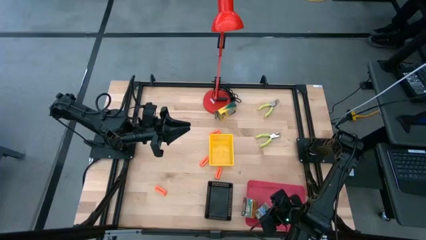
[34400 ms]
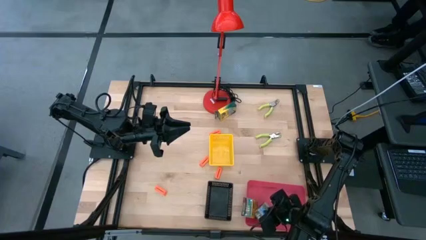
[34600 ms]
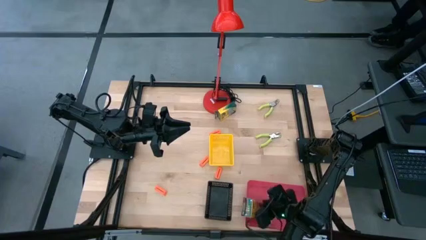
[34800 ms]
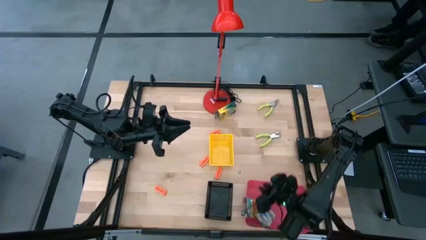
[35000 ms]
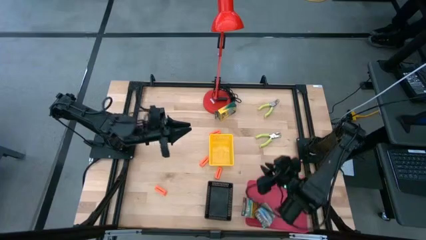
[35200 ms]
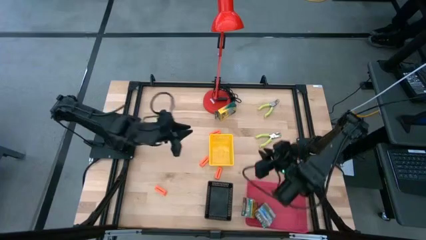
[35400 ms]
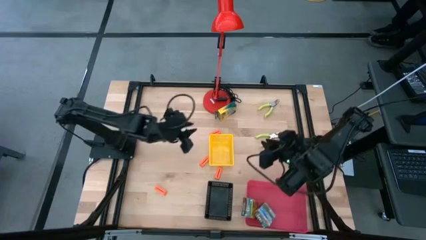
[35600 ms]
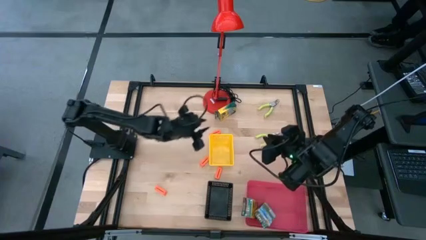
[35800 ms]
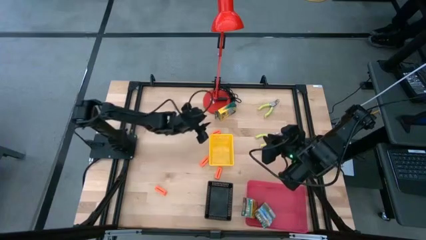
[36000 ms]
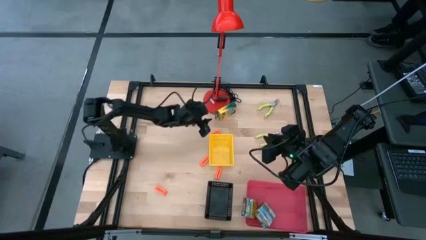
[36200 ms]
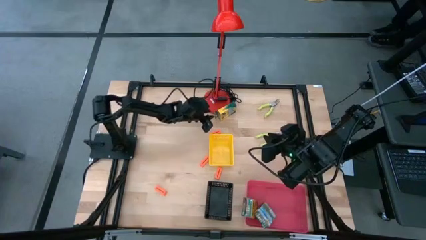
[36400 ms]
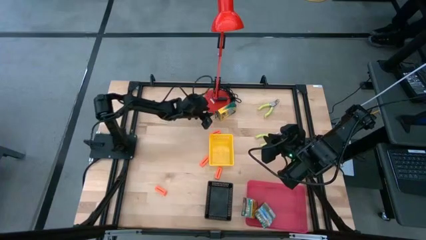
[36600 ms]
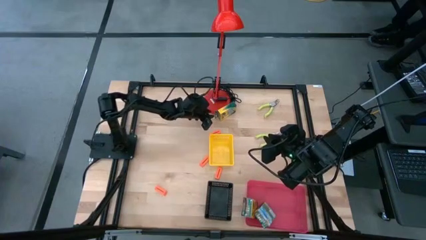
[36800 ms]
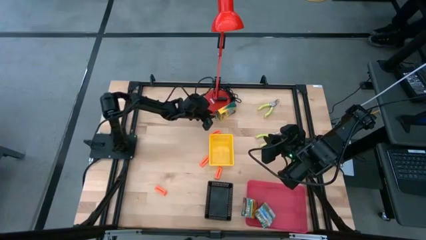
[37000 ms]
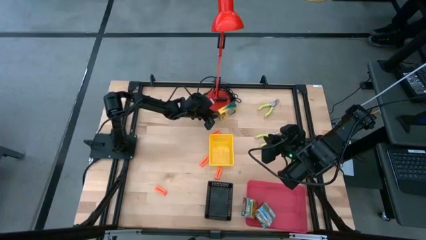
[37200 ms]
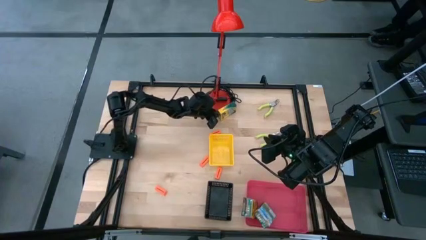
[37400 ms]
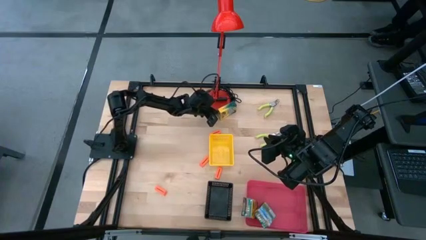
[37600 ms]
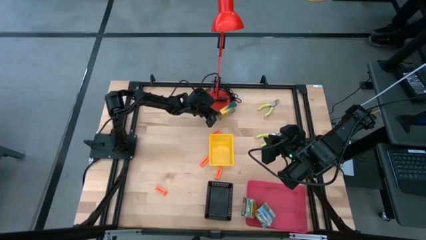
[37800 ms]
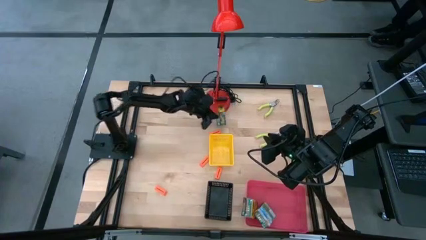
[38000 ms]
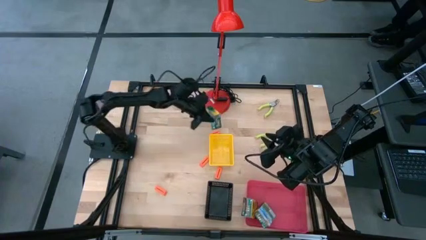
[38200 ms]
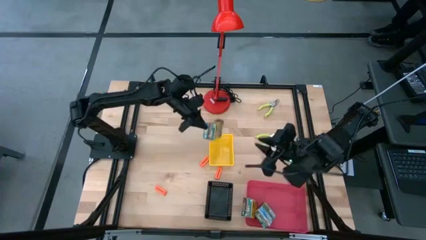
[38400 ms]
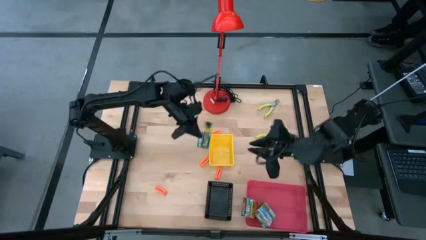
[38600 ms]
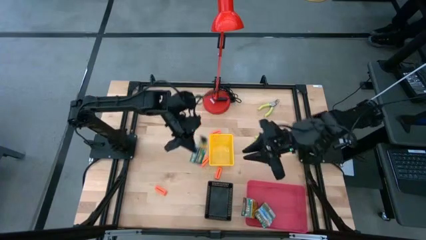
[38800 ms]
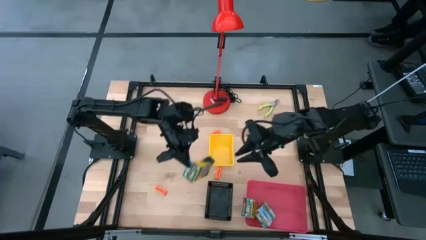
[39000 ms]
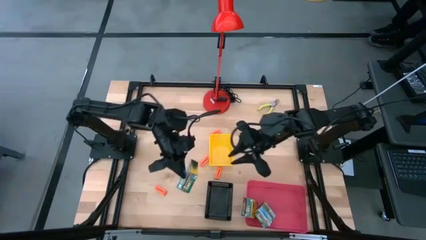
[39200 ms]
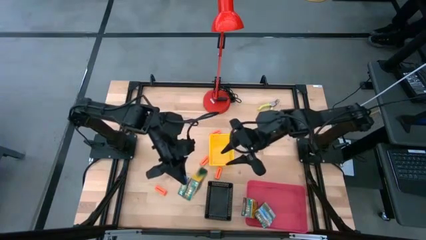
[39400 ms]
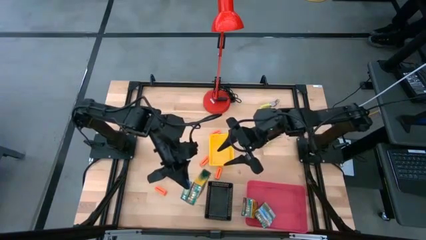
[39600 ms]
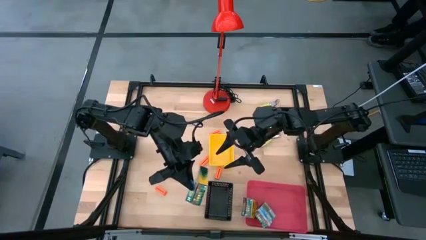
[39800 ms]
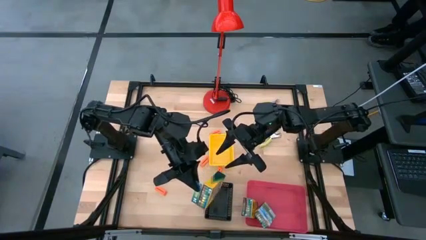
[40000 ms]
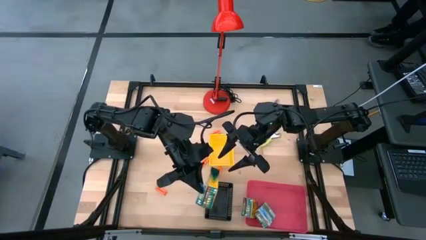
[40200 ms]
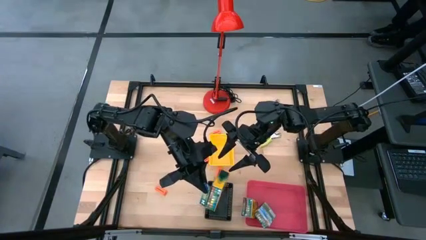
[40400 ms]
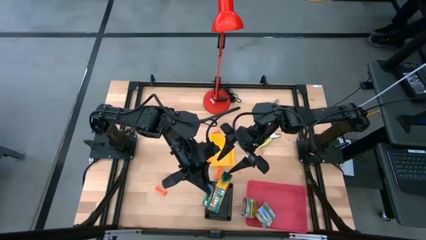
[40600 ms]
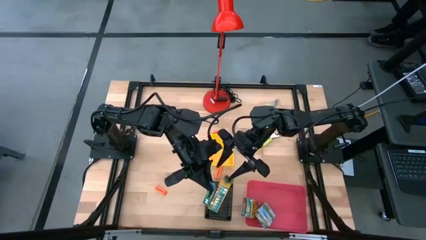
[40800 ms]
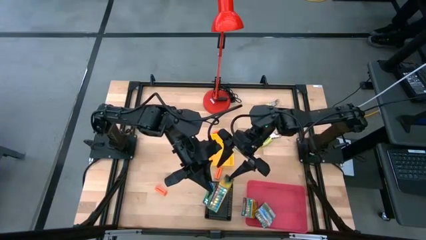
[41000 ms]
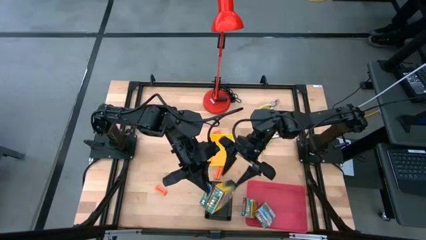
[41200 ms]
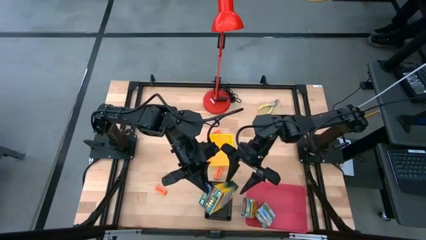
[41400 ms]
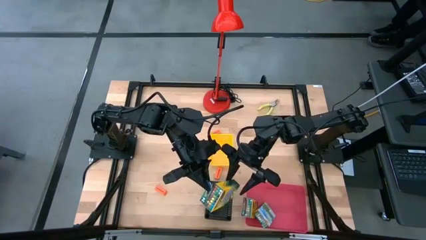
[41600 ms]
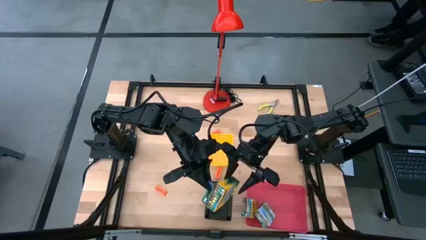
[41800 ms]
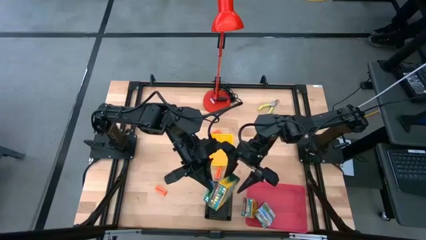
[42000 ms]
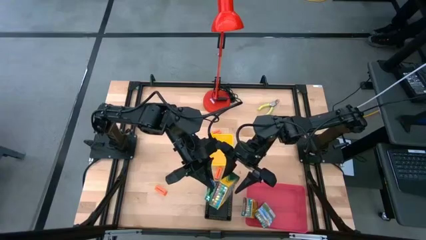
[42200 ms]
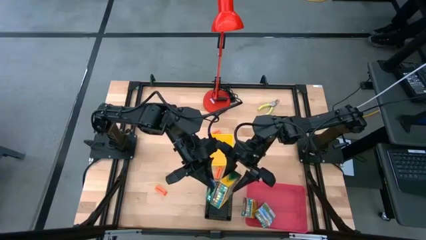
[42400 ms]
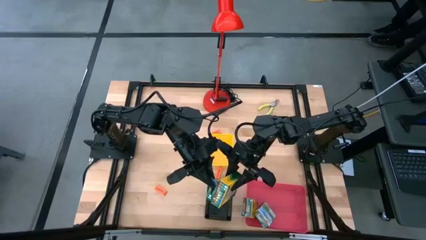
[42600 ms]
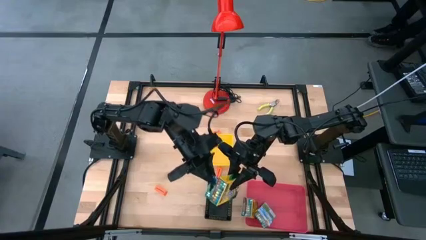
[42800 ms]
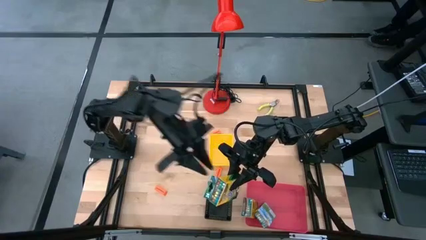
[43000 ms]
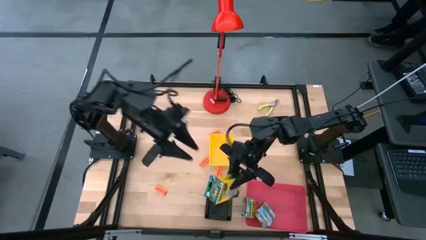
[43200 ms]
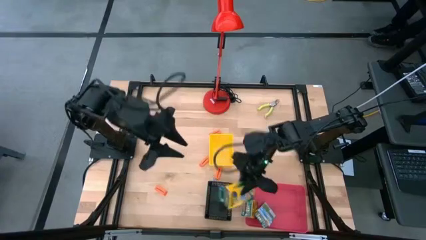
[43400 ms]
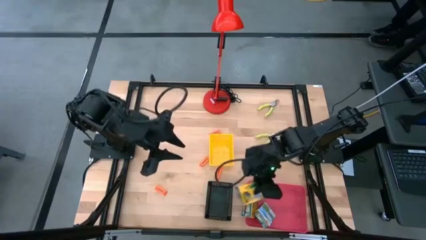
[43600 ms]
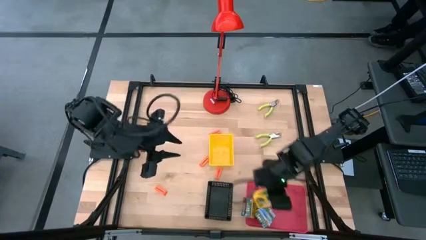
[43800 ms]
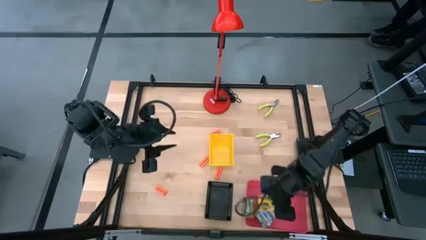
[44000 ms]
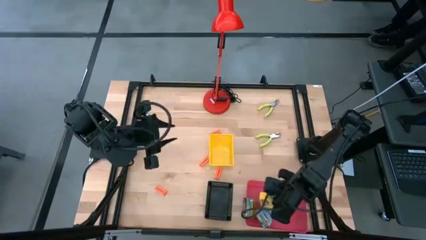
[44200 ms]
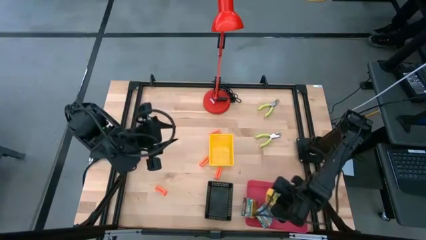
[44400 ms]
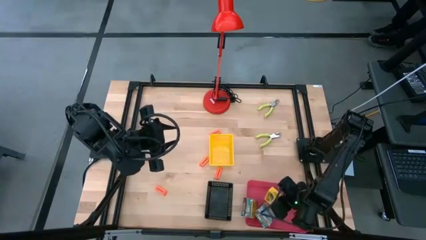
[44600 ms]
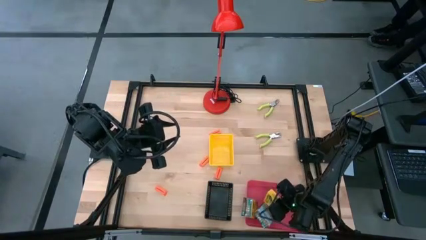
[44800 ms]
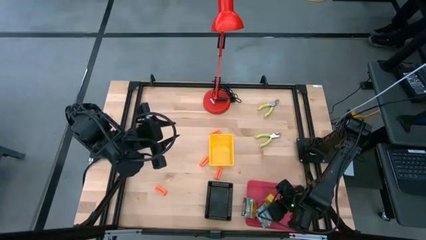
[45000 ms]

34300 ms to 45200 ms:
Task: Pick & Place School Supplies
Put the yellow crayon box into the pink bin
